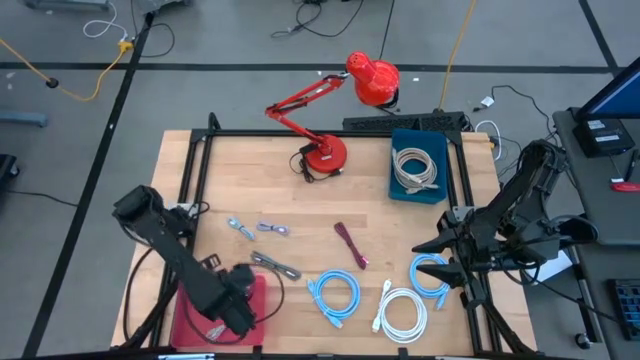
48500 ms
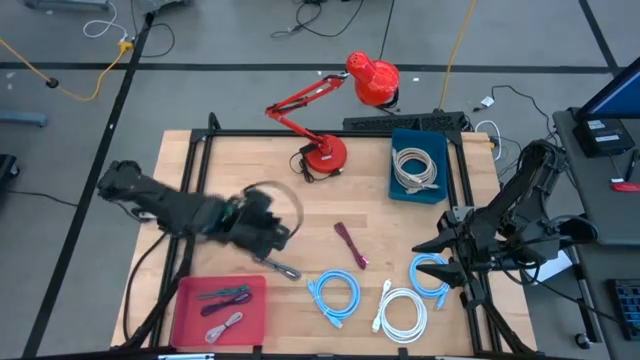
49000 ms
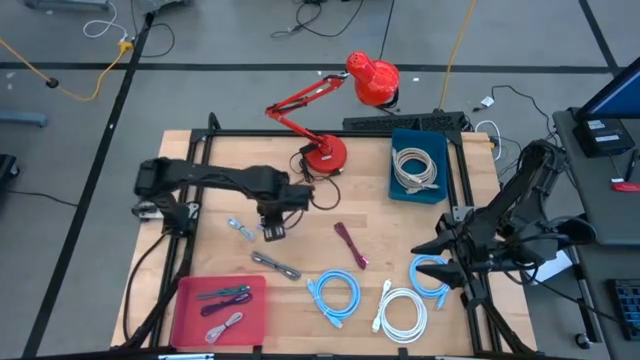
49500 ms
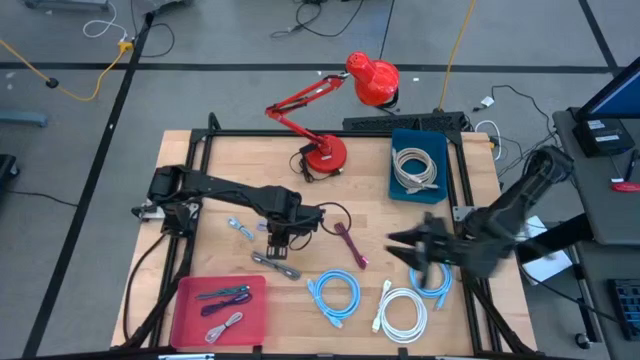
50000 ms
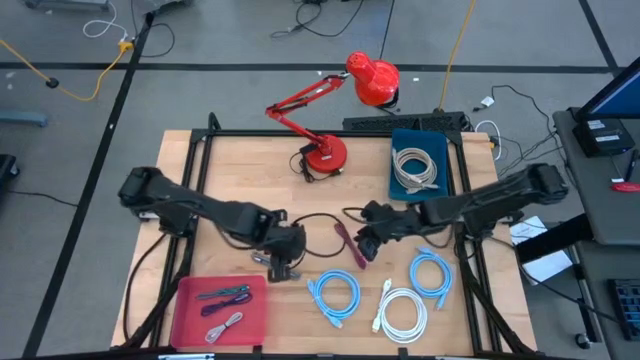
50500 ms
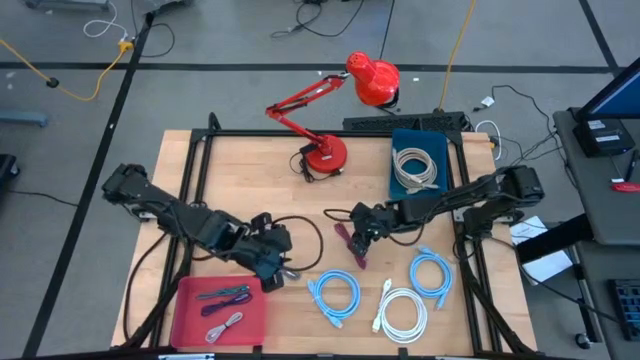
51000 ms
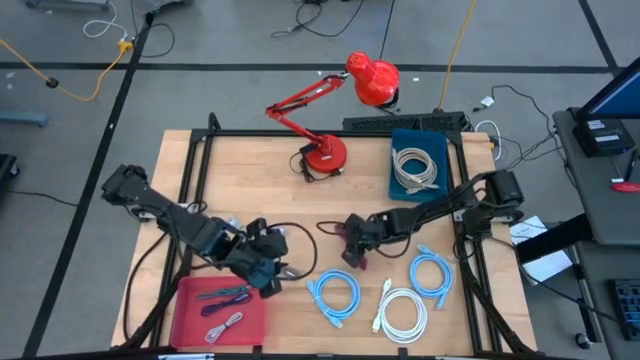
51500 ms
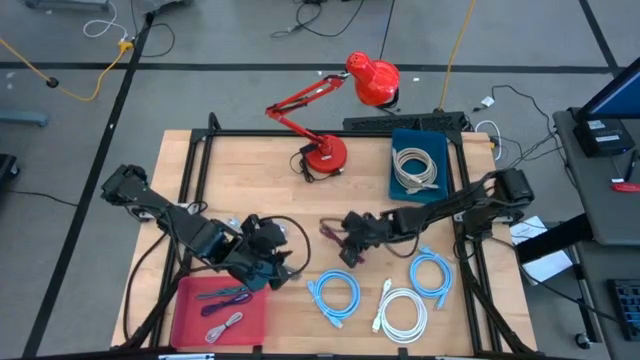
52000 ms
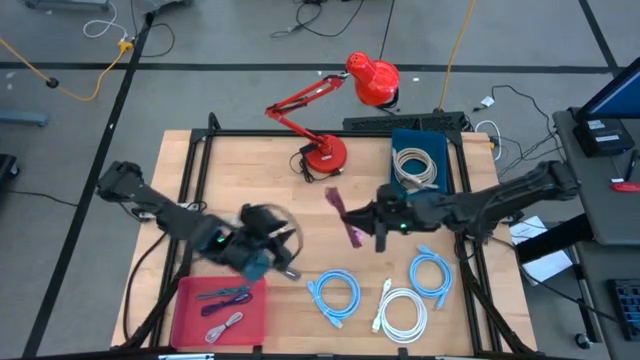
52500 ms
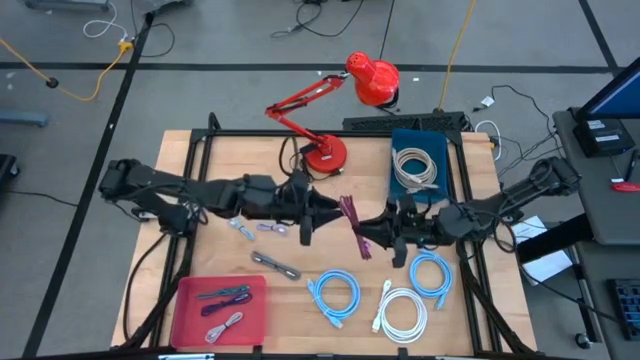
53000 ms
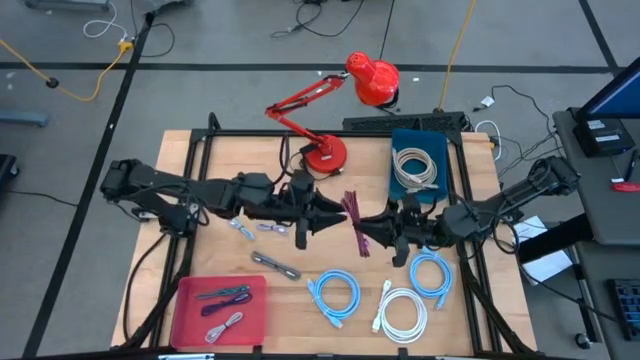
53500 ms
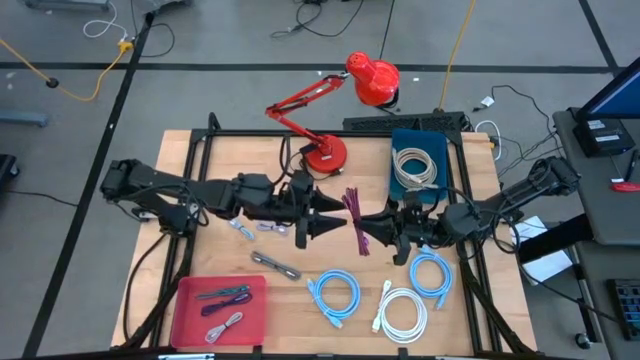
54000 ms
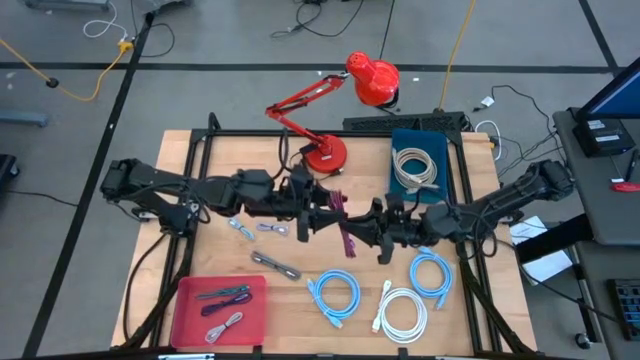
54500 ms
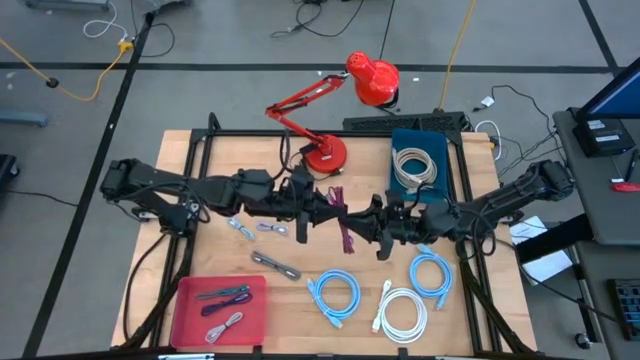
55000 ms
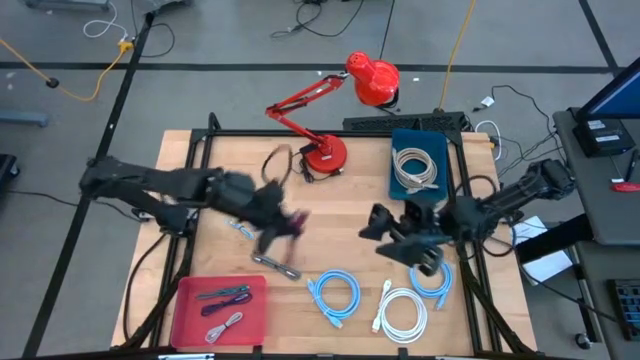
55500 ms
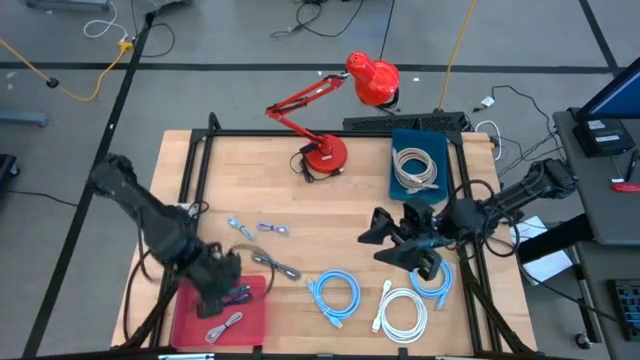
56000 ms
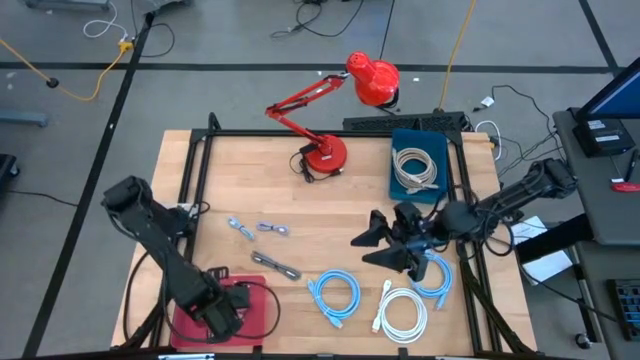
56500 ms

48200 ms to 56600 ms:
Task: Sort cables
Put the purple charger cable into the pink bin

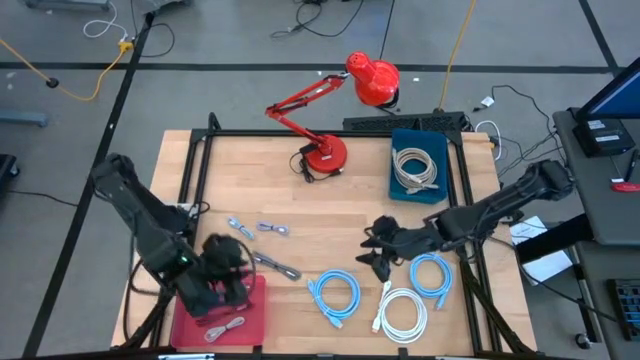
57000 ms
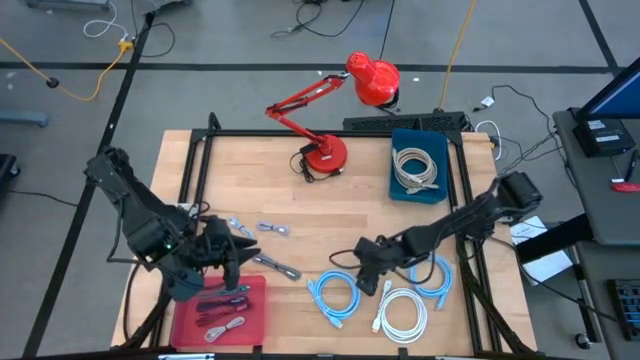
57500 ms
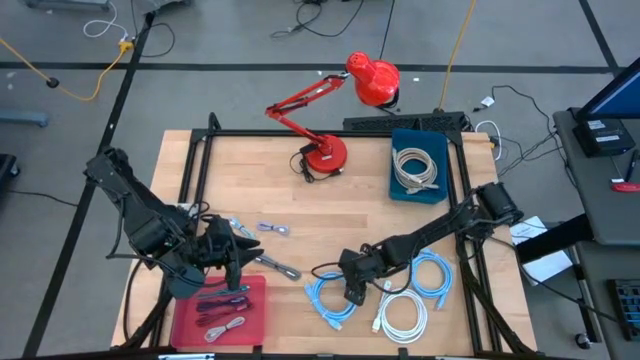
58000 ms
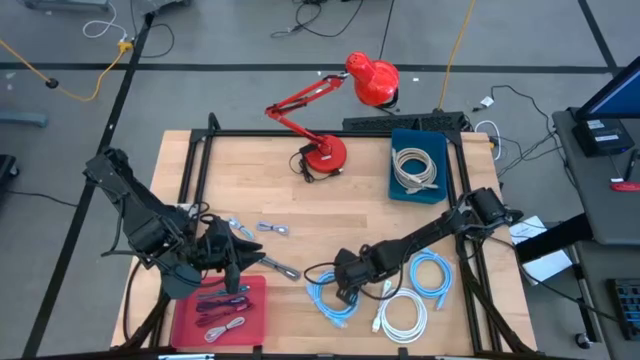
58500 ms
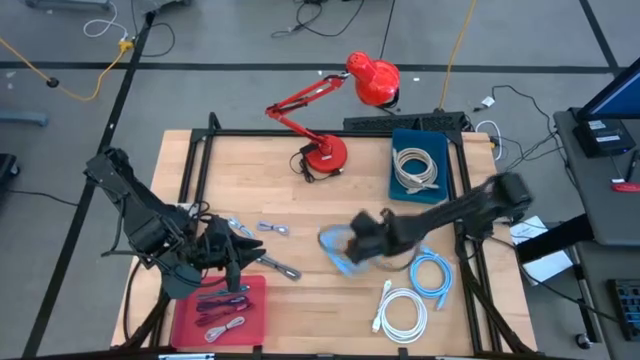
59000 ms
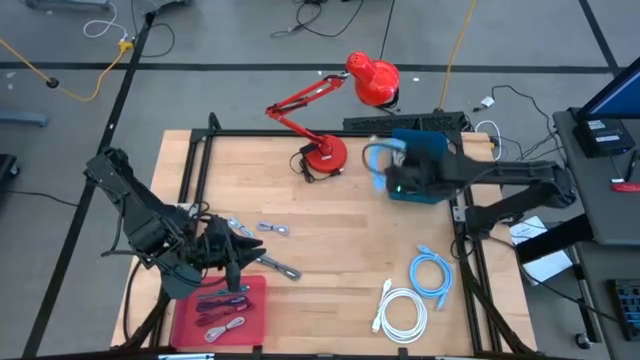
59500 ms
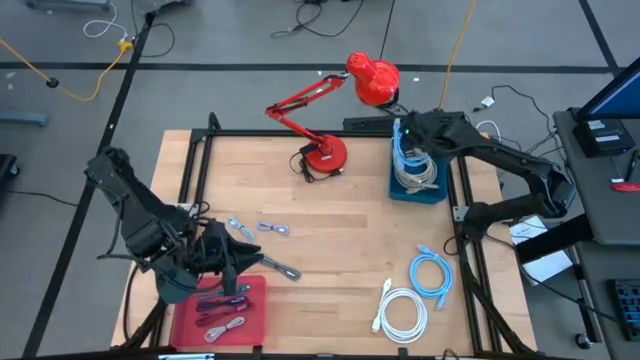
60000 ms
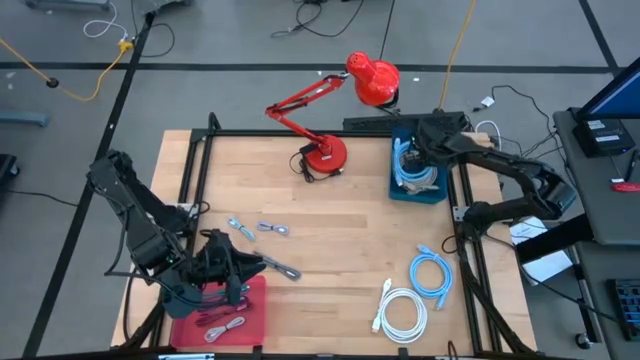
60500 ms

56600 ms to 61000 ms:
Put the left blue usb cable into the blue bin

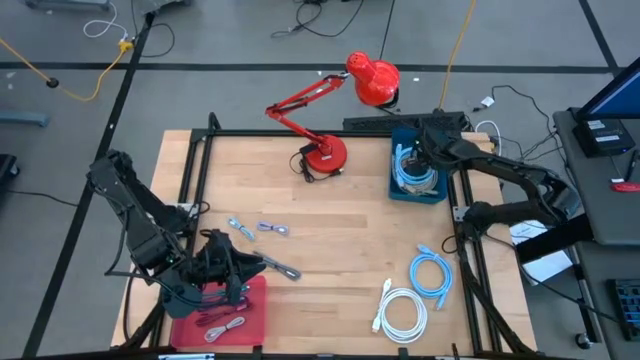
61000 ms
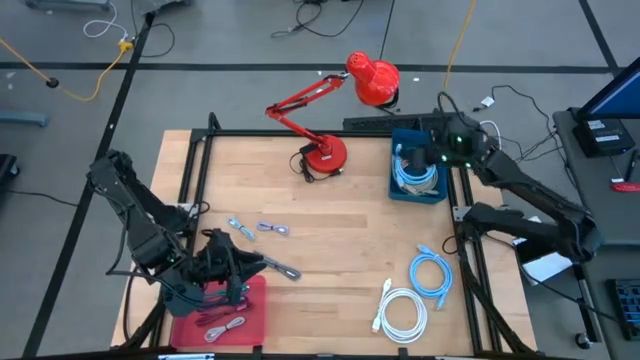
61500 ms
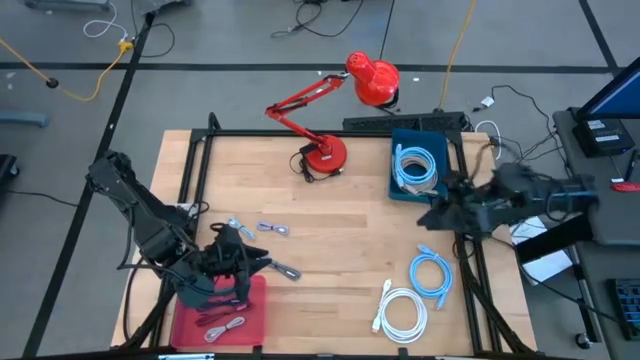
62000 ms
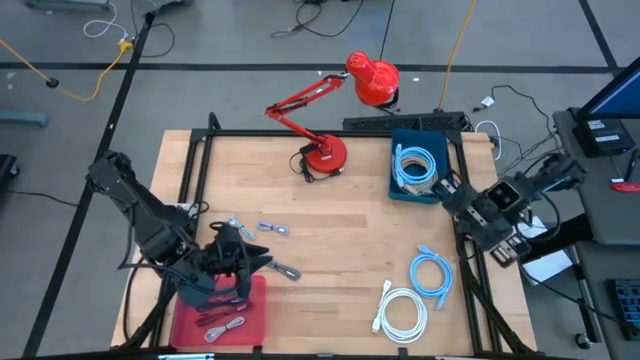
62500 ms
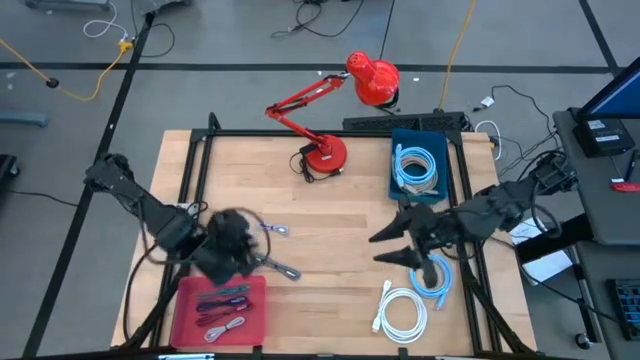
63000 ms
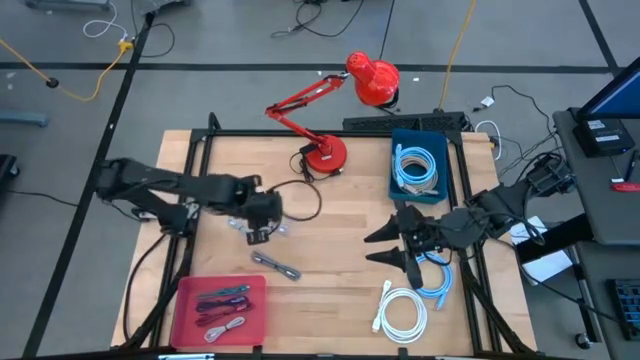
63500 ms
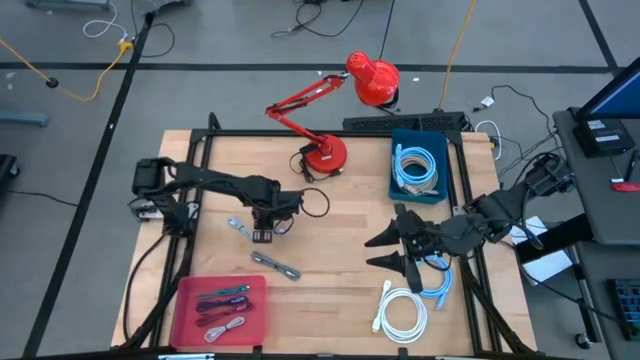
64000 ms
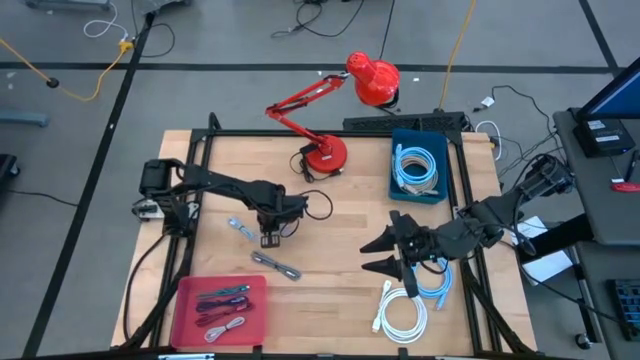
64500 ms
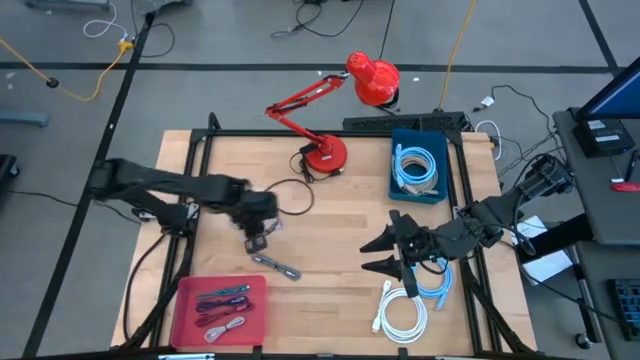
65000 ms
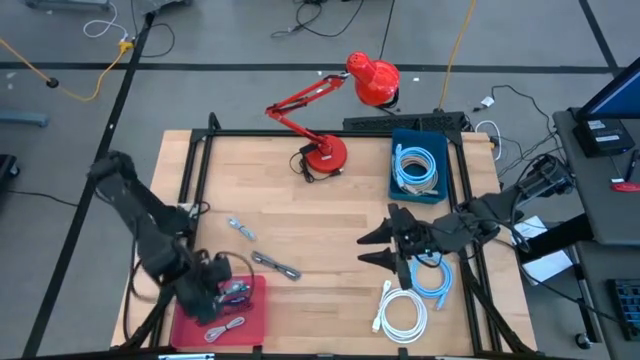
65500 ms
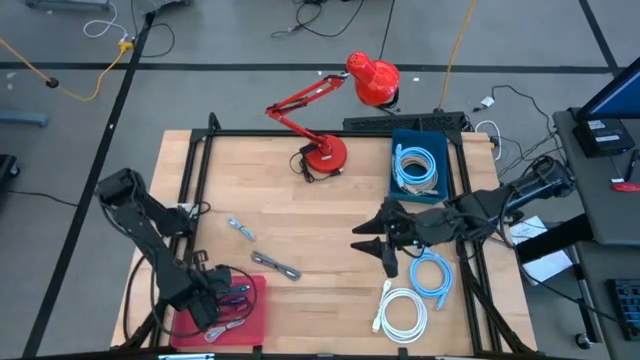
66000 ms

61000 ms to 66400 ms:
Put the right gray charger cable into the pink bin

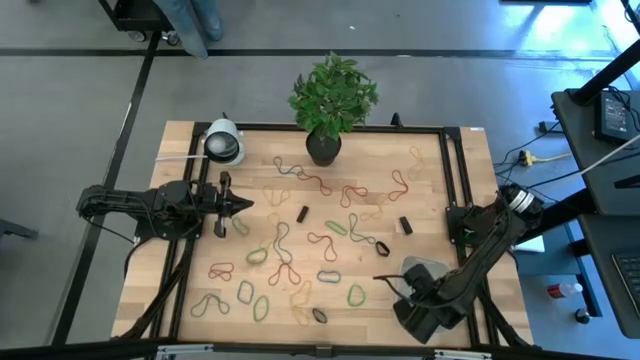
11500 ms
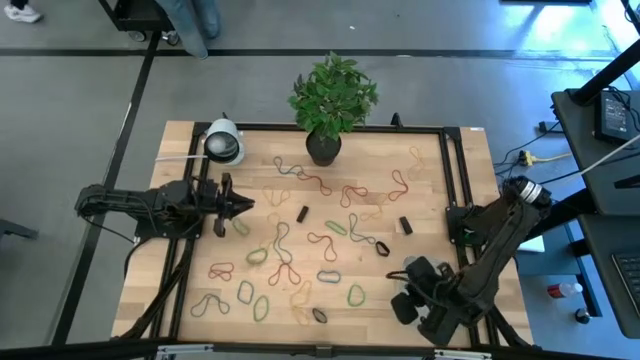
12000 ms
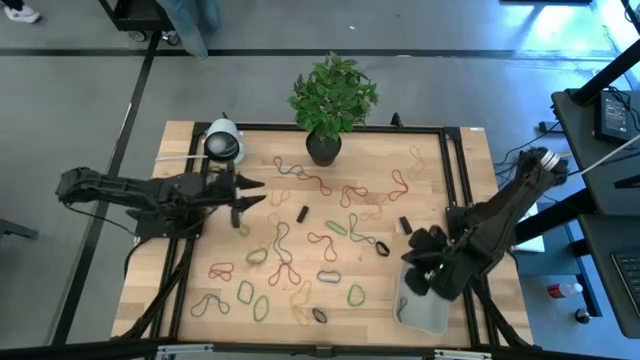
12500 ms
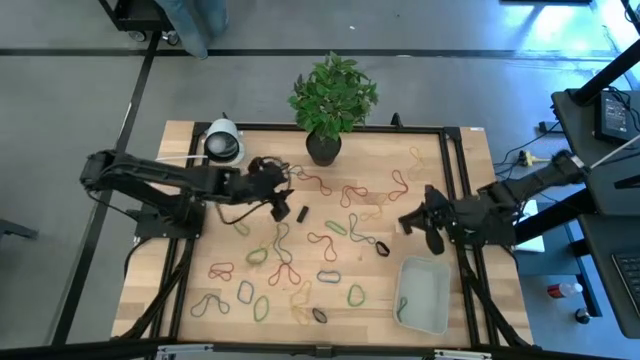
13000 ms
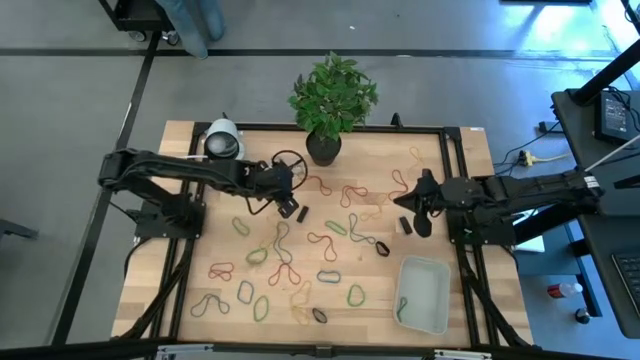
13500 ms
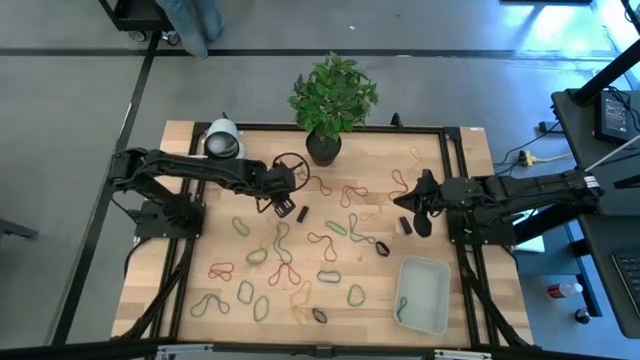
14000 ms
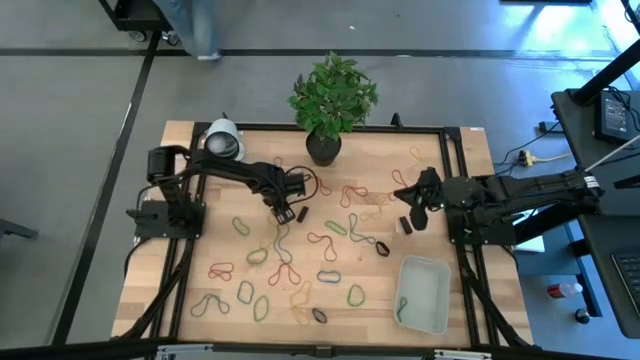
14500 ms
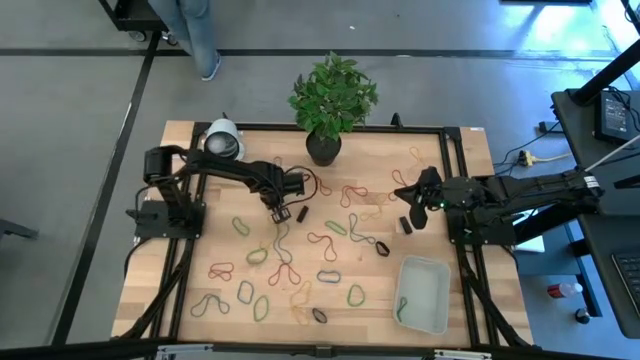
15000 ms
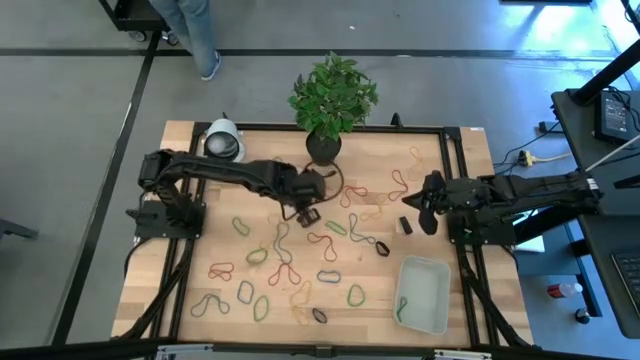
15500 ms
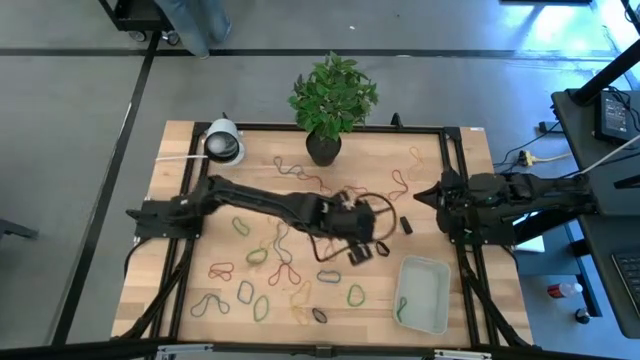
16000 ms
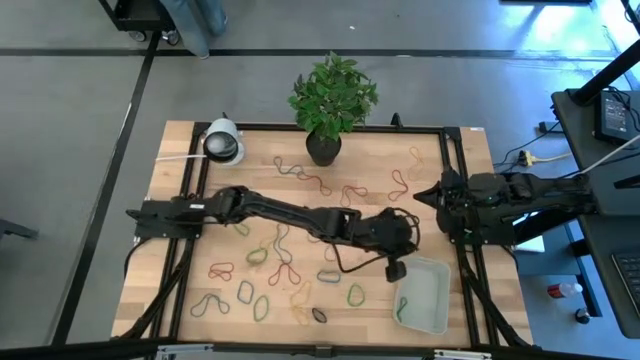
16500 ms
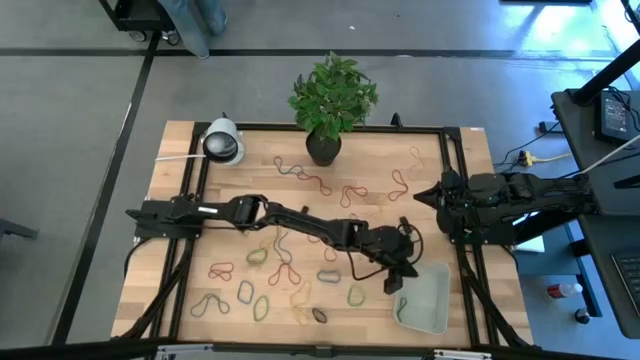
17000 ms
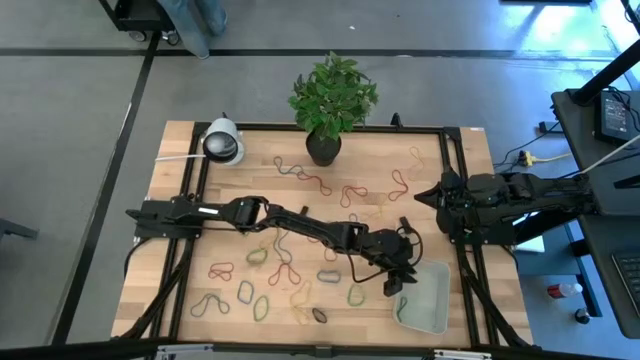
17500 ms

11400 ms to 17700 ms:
Task: Pick and place rubber bands into bin
Put the yellow rubber band into the gray bin
